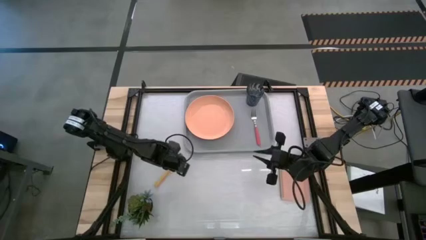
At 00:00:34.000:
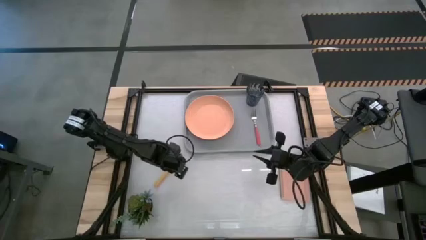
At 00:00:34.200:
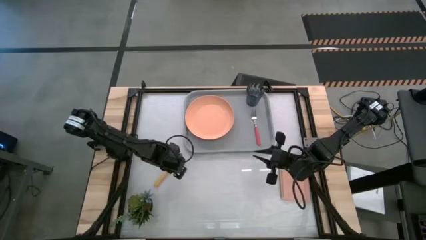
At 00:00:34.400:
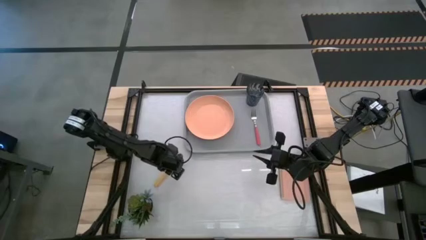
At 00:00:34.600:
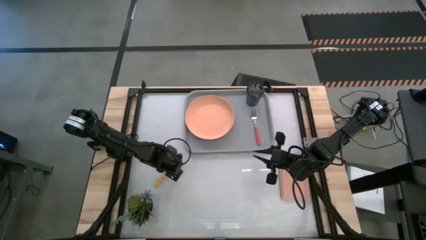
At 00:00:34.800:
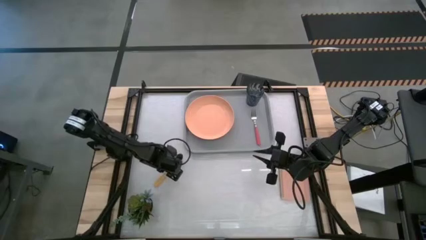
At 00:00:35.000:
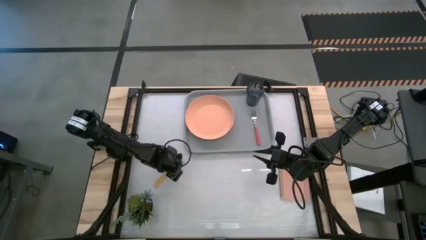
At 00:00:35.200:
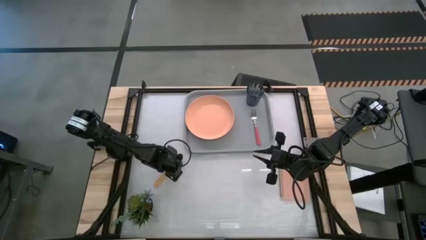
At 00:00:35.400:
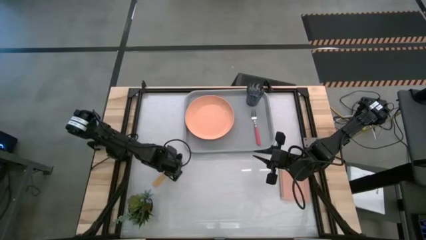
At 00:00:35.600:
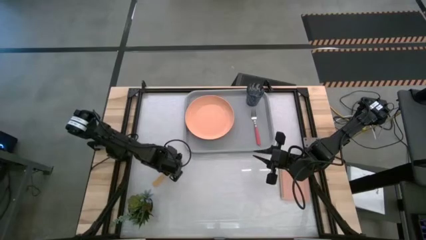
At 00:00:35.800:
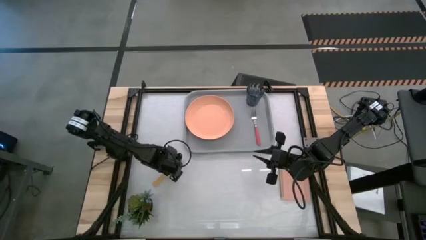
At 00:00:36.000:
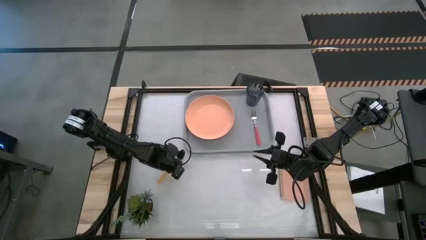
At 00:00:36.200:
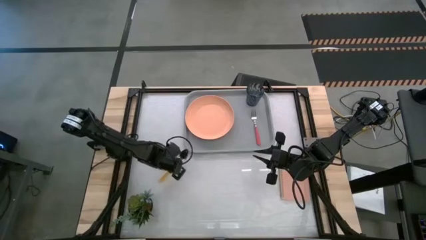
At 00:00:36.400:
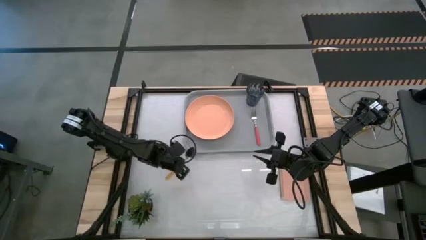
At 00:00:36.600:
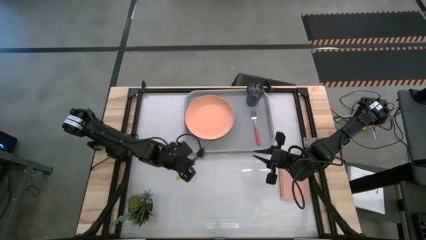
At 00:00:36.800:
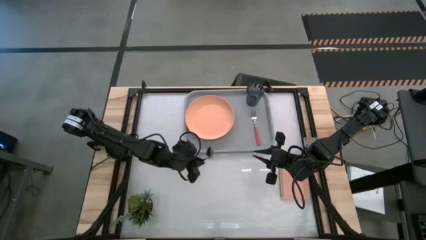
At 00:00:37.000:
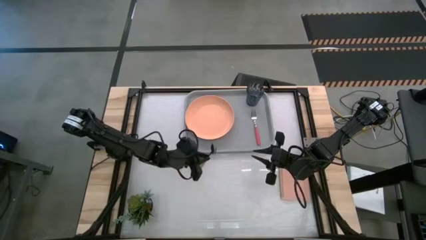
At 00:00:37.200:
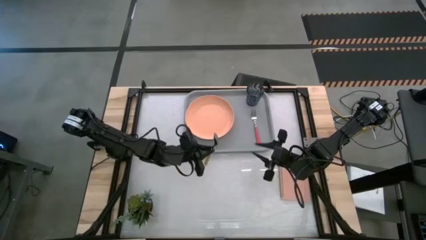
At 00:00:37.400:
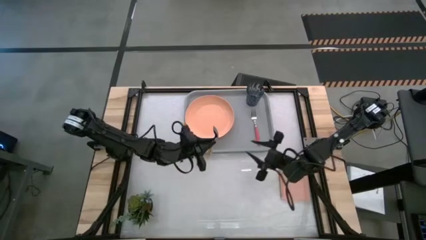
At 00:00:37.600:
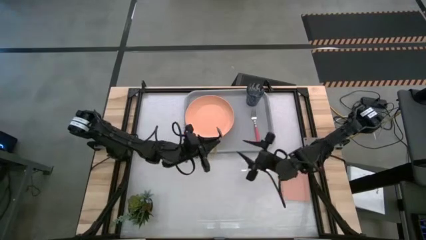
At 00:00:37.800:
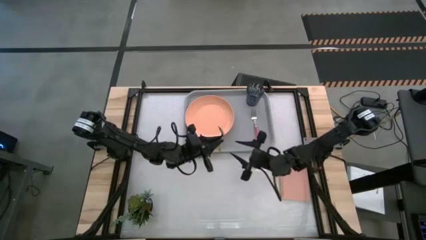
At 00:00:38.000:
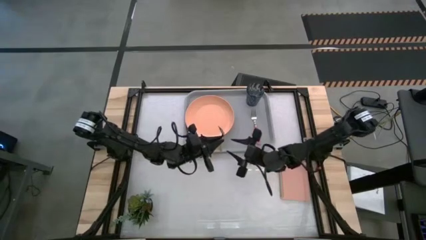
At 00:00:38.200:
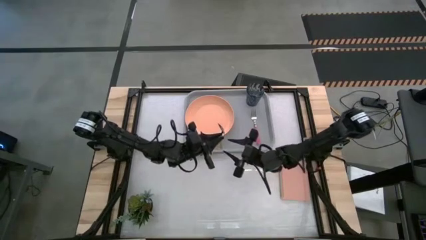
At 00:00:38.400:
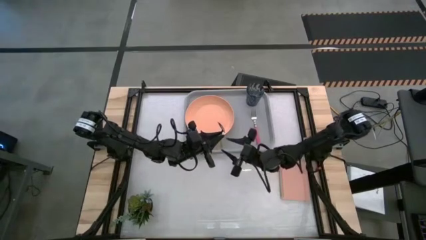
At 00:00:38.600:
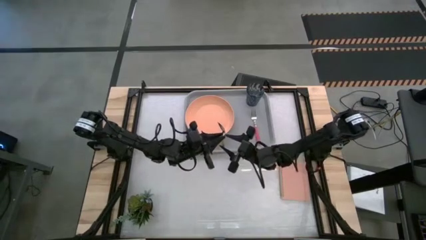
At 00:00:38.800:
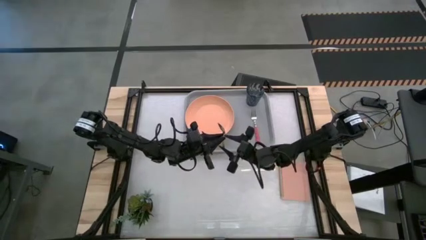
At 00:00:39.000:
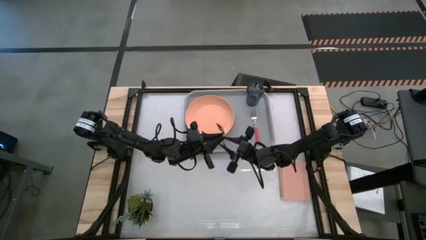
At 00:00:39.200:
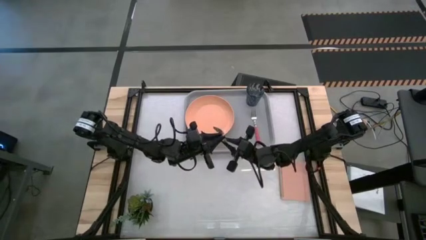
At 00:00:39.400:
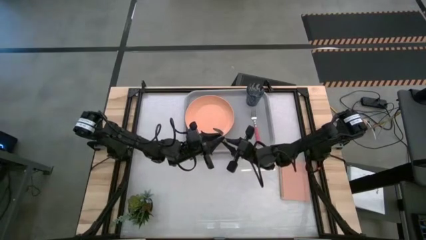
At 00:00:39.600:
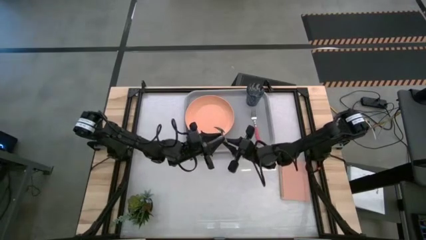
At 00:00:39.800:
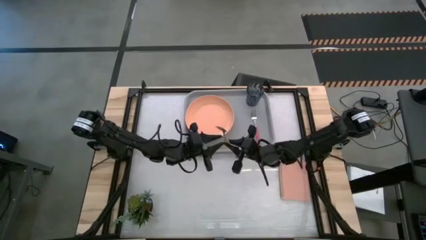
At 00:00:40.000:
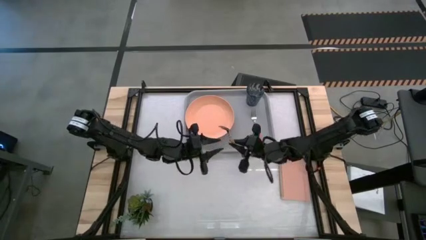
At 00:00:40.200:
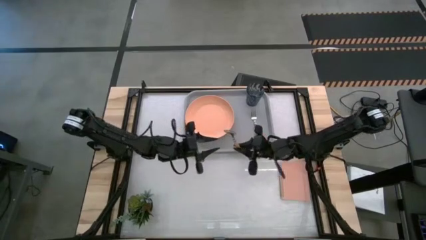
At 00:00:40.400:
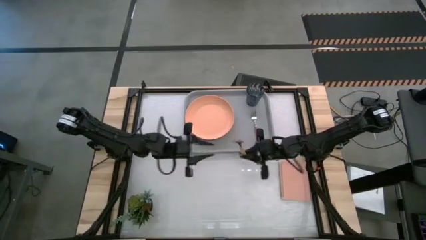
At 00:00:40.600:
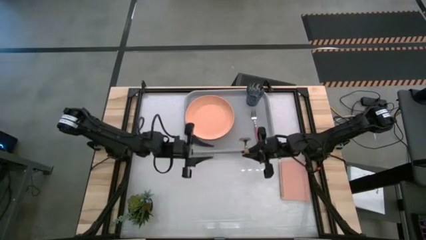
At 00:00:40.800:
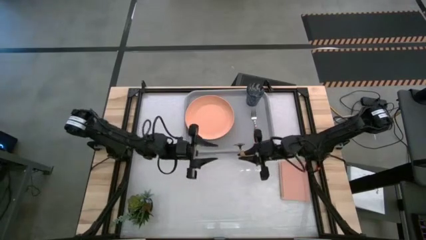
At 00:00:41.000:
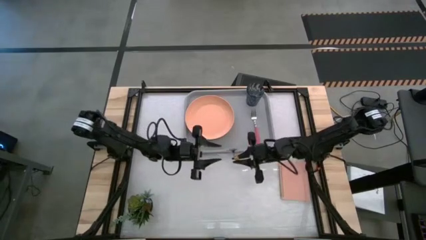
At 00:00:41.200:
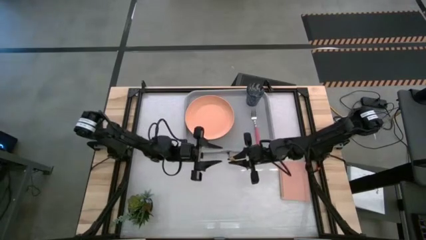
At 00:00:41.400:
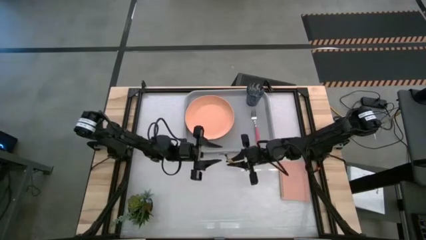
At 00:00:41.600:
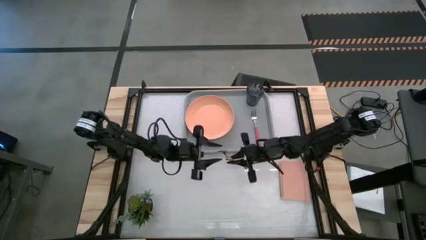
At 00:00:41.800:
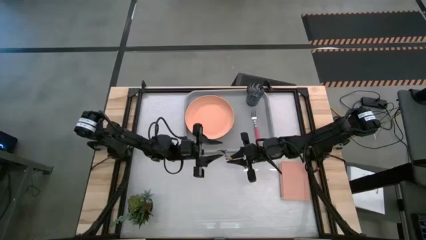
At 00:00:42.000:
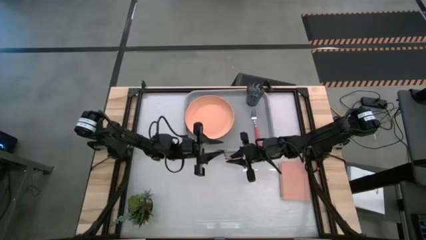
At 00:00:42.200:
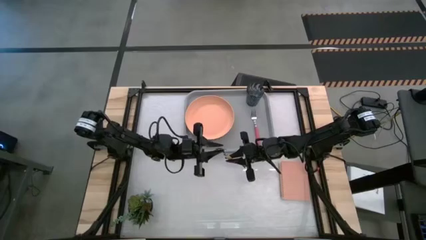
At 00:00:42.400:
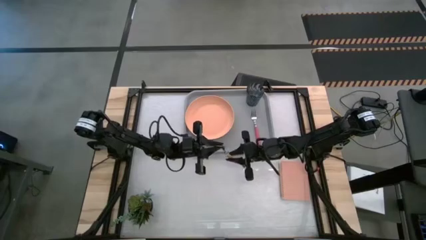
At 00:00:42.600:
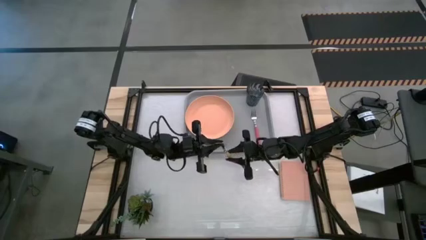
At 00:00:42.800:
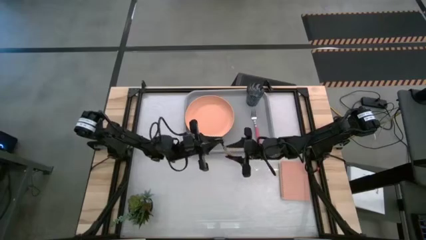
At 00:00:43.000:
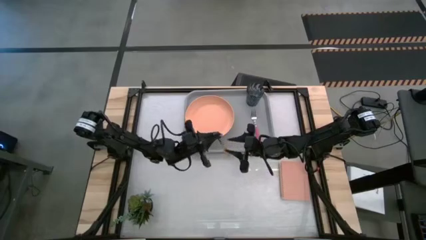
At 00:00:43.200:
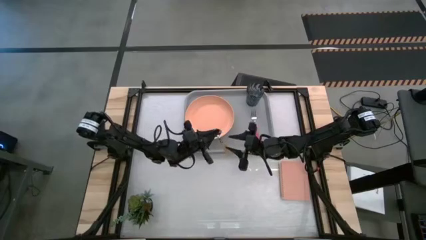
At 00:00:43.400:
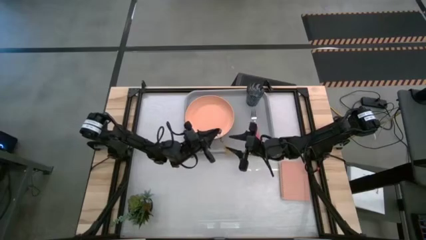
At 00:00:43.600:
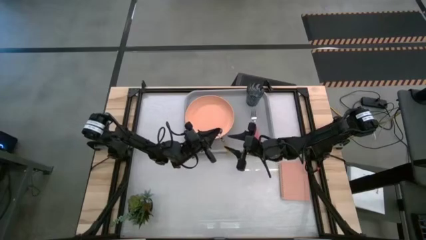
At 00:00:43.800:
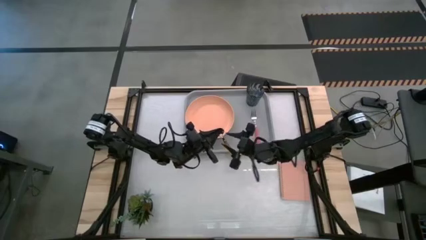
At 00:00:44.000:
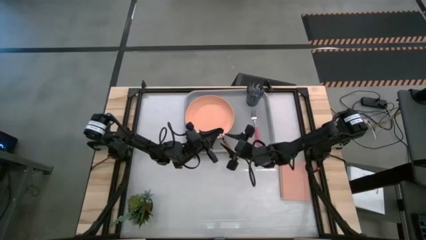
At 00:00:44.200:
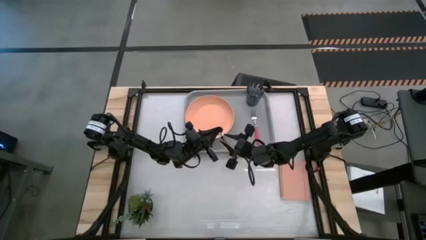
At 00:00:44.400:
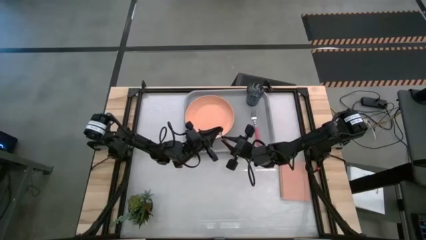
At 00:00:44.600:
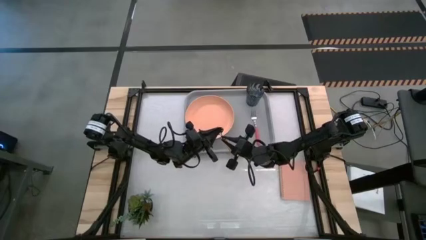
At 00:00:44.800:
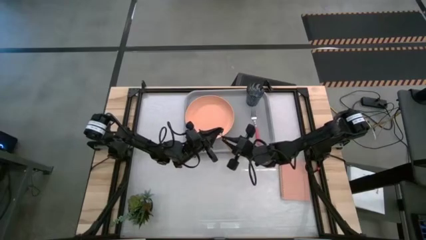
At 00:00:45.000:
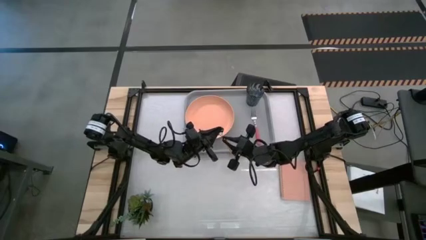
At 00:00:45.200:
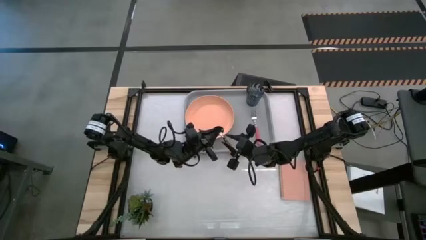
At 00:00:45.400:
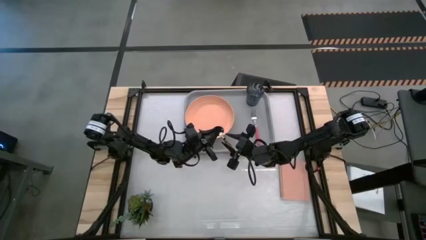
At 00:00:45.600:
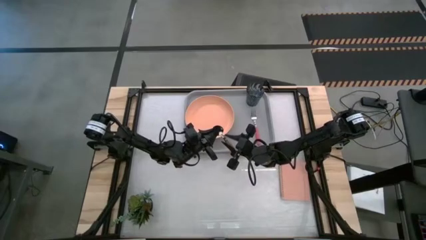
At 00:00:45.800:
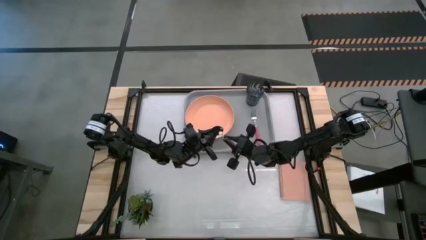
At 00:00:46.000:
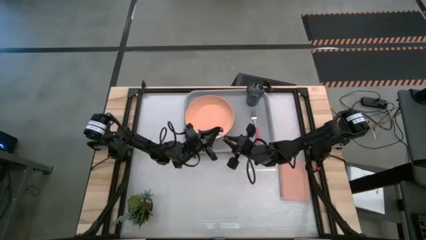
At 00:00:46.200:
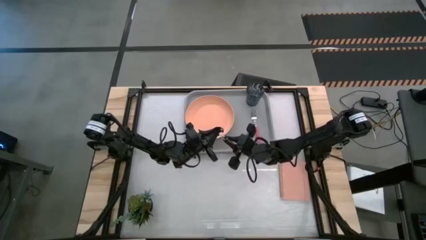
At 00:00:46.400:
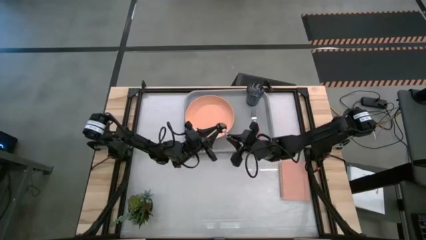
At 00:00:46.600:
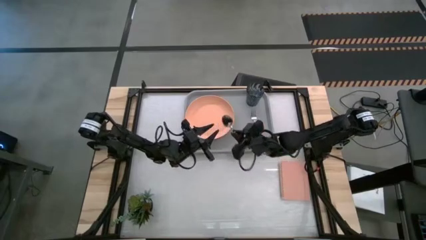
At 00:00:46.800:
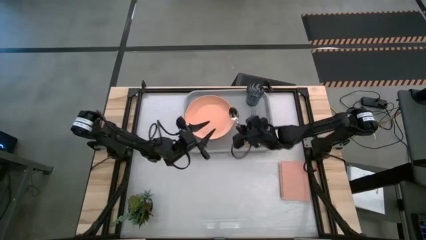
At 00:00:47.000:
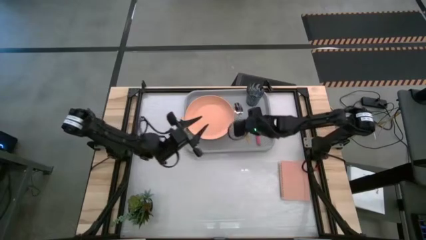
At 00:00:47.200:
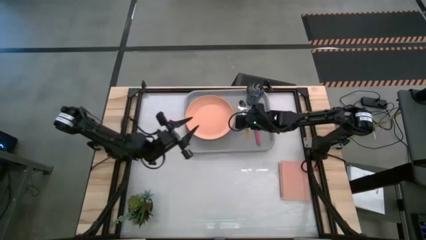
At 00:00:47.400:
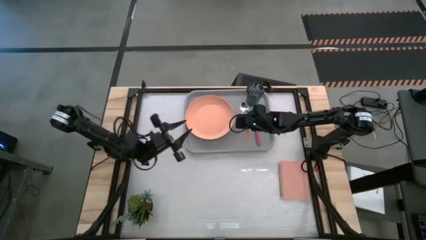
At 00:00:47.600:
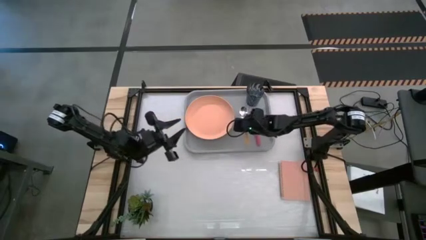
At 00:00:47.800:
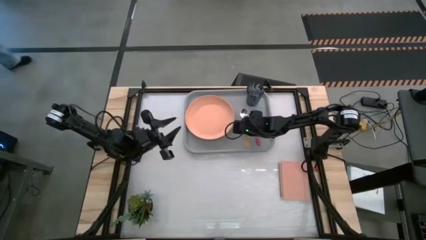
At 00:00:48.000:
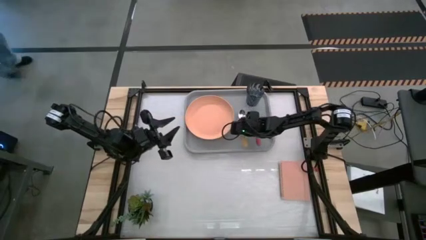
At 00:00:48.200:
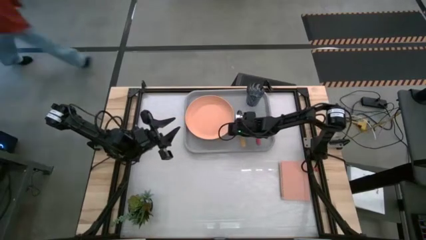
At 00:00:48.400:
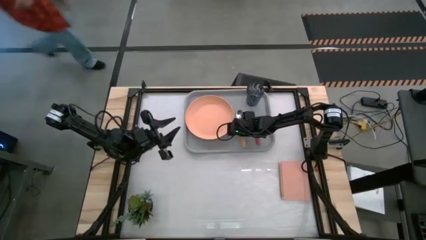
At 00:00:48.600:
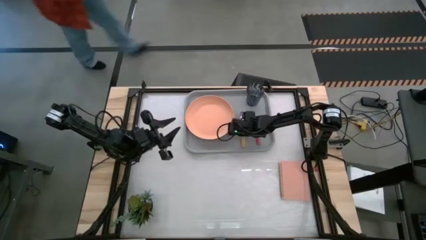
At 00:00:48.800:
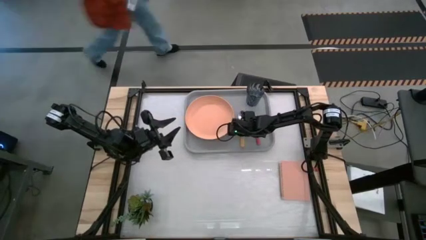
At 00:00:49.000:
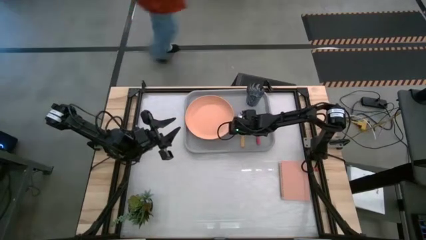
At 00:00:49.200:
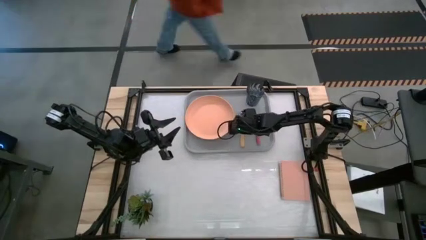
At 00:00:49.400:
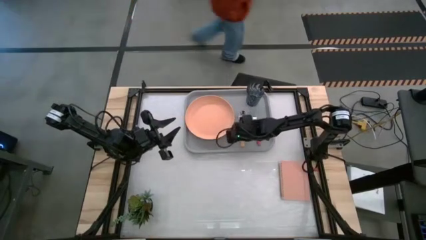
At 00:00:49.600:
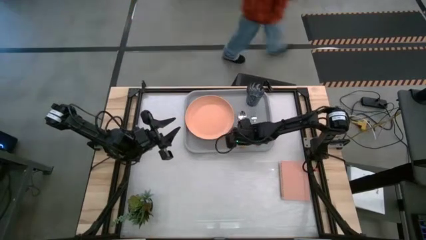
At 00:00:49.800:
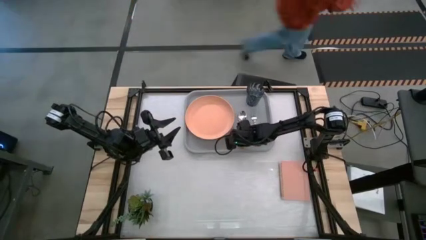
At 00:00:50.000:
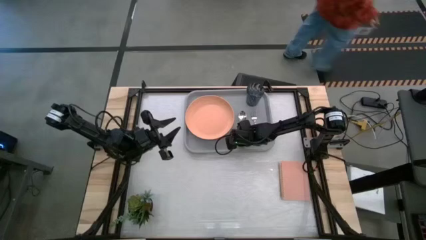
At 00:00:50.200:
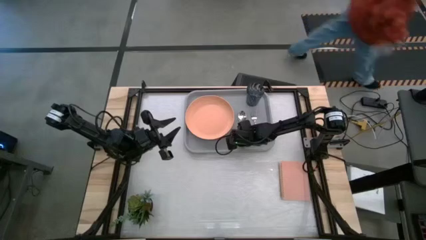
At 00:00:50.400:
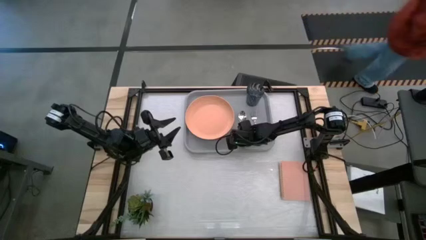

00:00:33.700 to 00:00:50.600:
Task: Pick and place plate/cup/fork/spoon on tray
Put the yellow spoon on the gray serving tray in between the orange plate and pink fork
